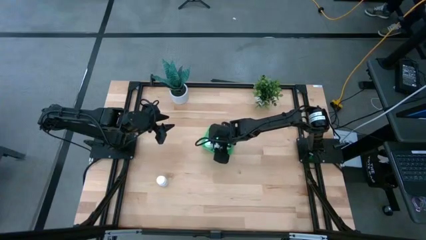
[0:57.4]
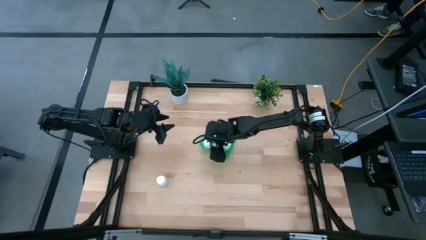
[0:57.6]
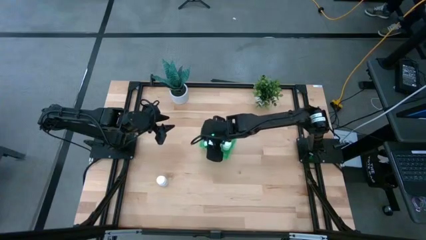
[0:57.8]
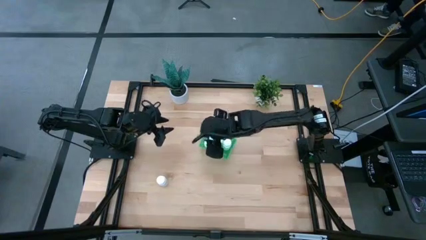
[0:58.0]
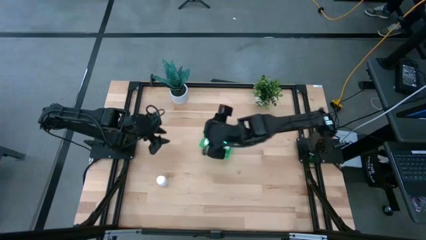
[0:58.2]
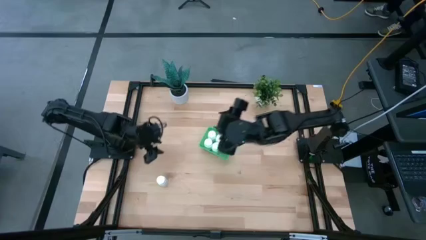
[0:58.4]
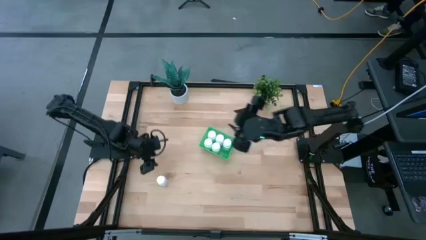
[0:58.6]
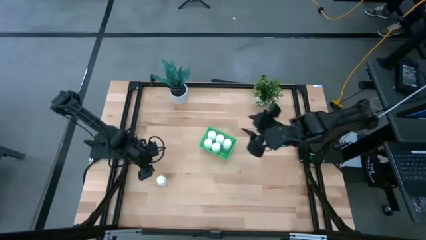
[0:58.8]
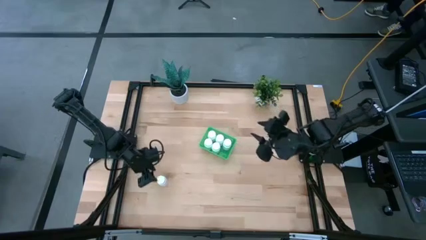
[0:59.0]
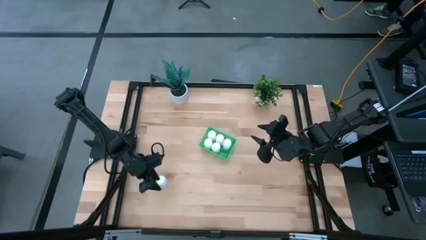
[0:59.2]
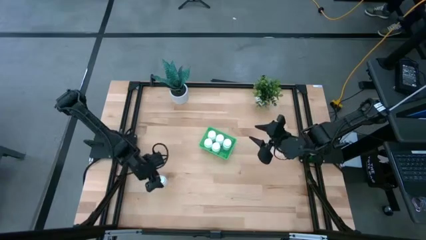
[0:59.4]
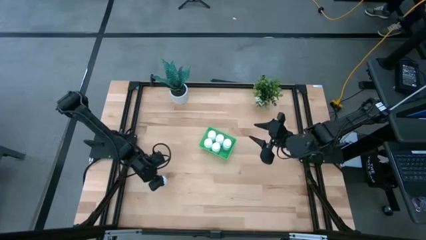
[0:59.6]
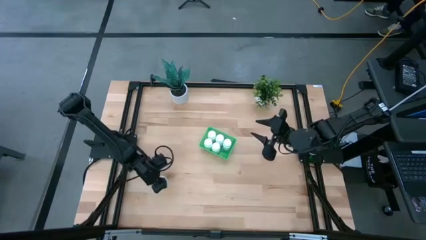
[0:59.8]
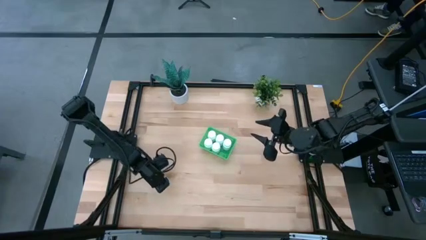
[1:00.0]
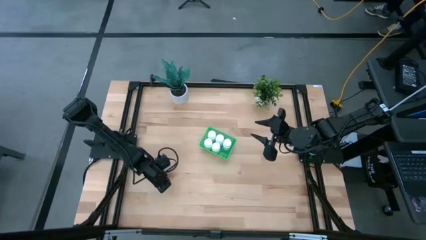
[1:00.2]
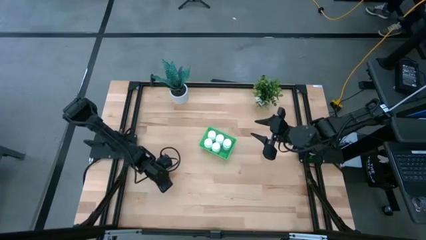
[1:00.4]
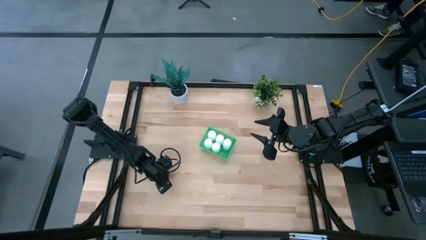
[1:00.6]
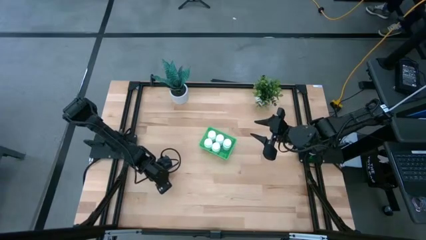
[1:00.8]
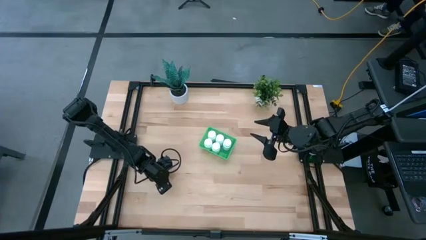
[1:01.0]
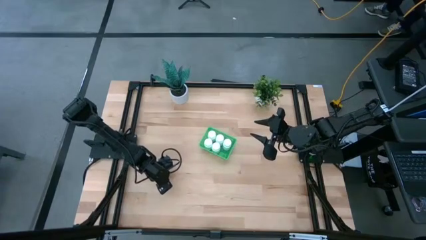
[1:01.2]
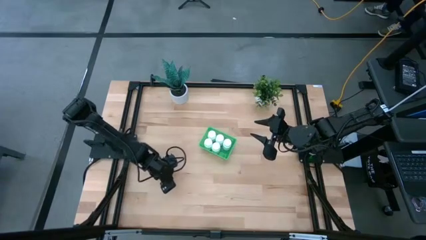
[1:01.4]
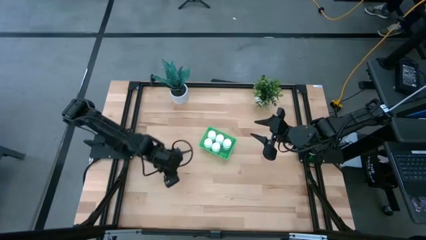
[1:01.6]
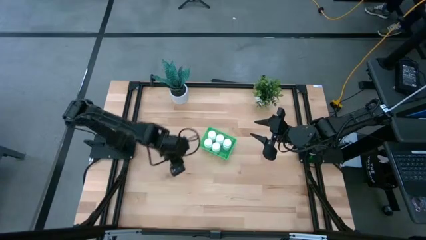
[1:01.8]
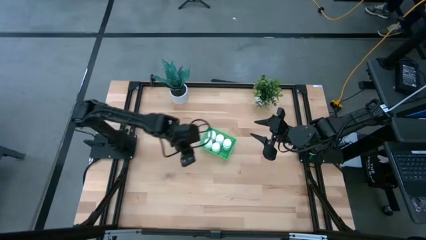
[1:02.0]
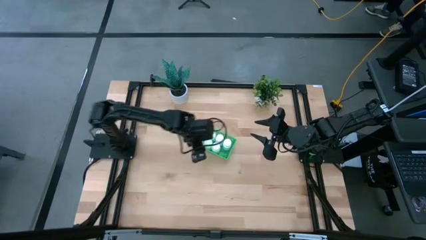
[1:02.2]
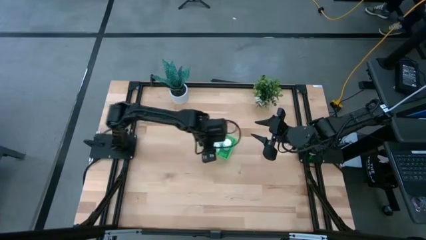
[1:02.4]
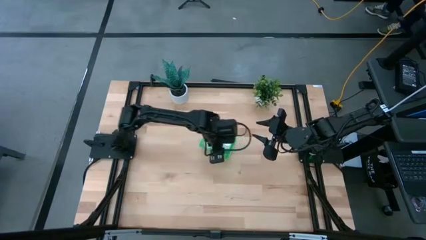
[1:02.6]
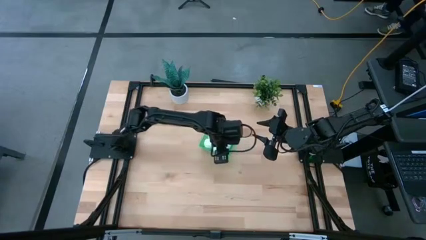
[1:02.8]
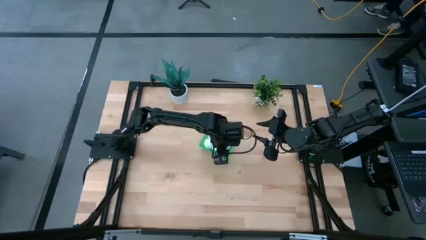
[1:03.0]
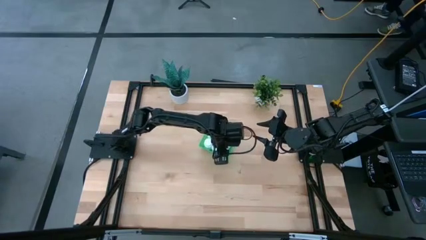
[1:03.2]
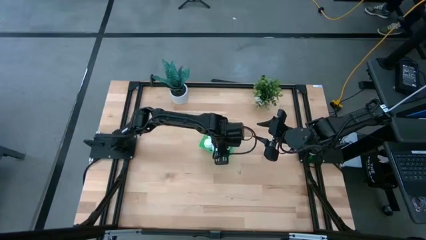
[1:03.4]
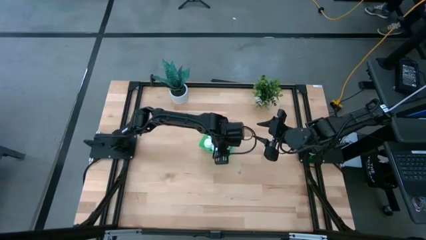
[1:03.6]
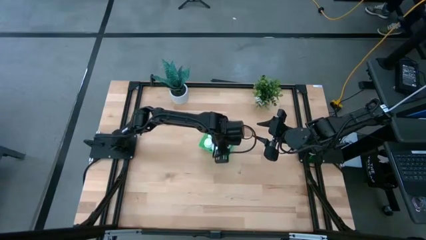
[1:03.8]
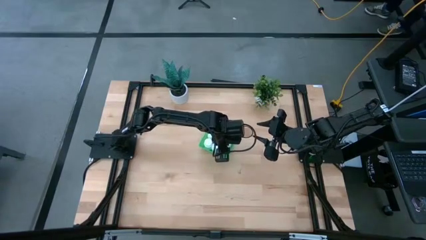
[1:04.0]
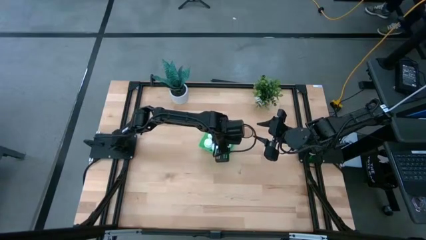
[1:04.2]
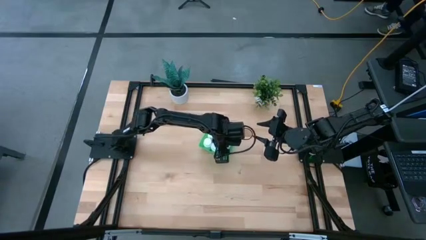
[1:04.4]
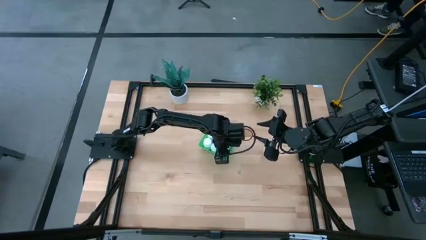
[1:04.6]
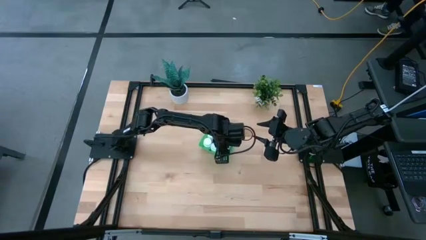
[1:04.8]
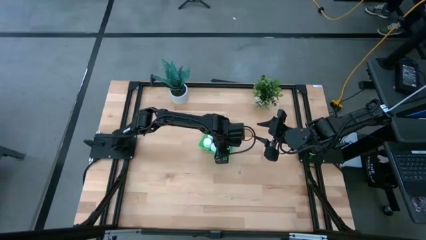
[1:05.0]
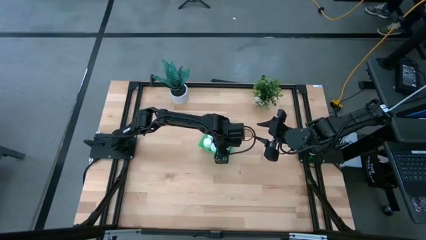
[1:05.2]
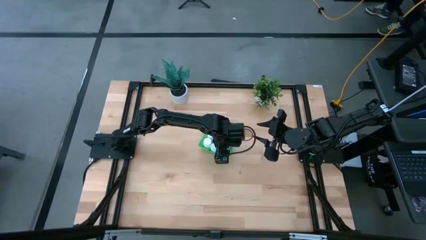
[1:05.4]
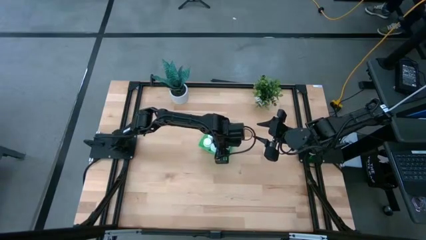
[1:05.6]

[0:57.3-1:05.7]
Task: Pick and place pill bottles into a basket
Put the medicine bottle into the green basket

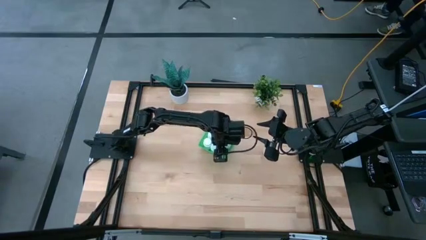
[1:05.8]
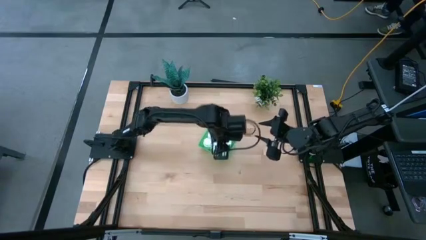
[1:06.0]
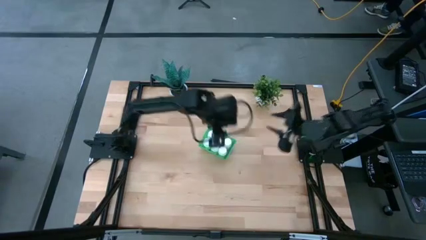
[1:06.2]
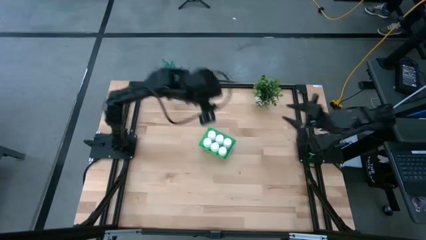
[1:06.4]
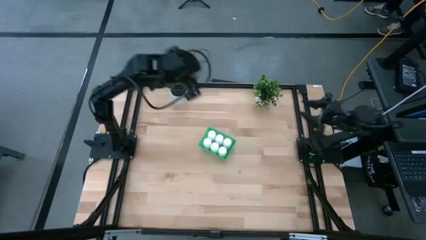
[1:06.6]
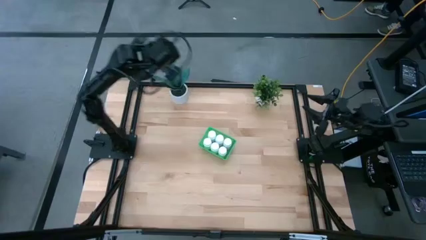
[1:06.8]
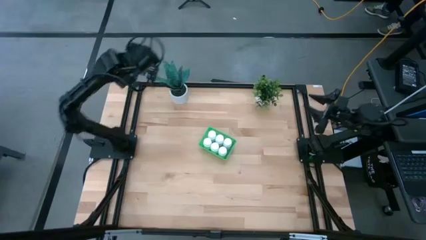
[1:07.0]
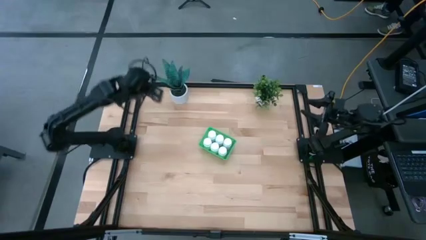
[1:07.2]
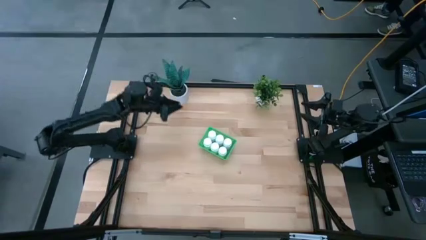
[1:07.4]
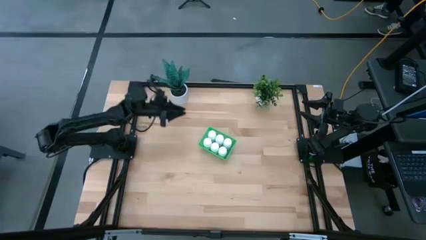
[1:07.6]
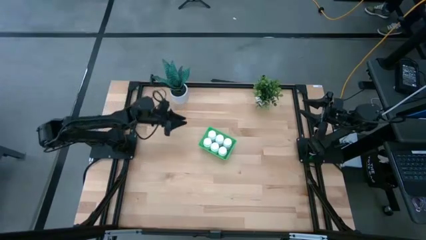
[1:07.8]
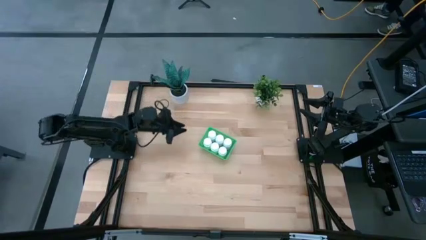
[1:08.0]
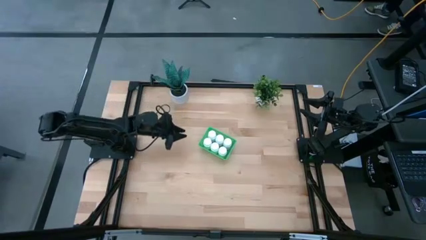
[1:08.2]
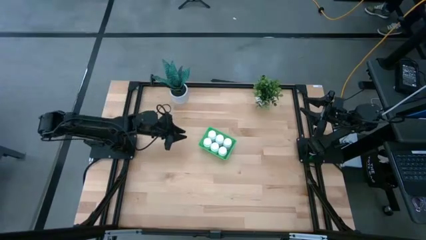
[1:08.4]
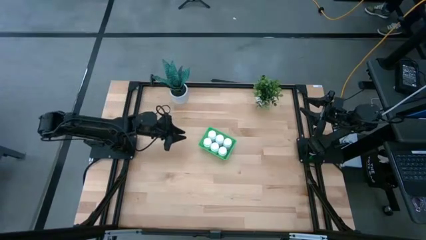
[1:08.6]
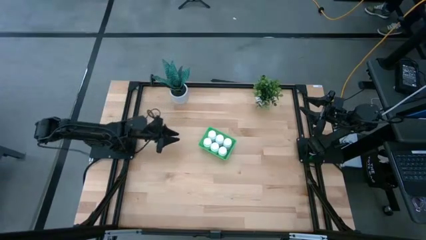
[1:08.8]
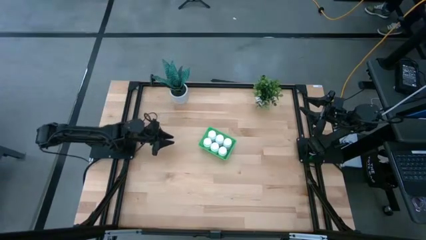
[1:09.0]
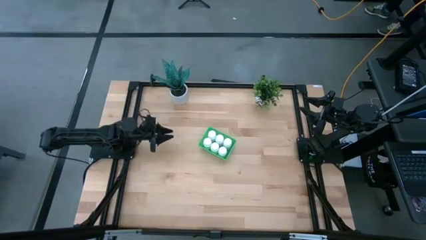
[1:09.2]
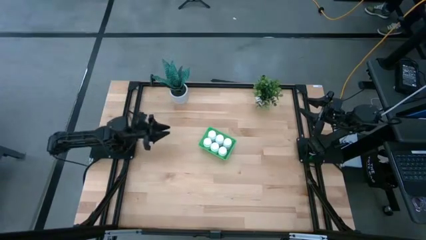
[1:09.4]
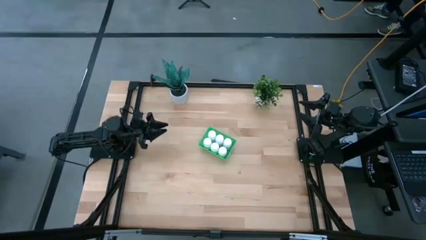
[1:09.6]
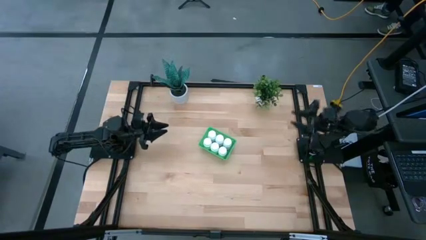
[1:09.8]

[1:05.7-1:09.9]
Return to Home Position

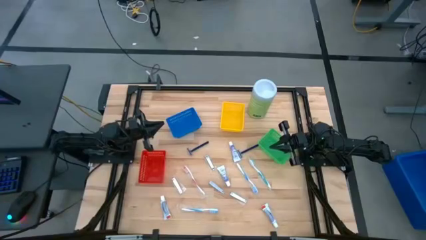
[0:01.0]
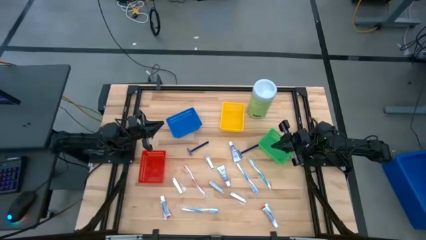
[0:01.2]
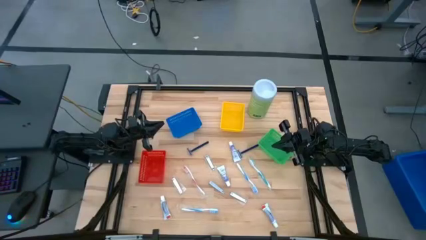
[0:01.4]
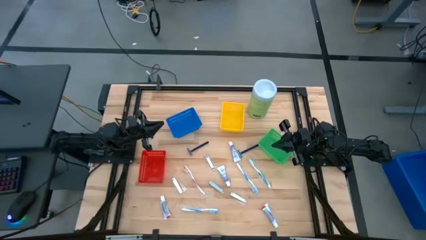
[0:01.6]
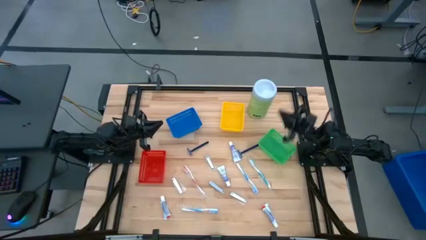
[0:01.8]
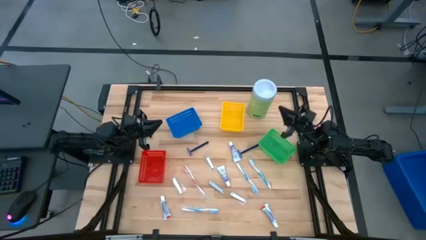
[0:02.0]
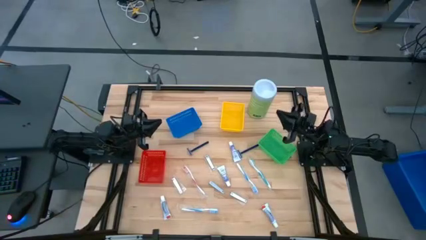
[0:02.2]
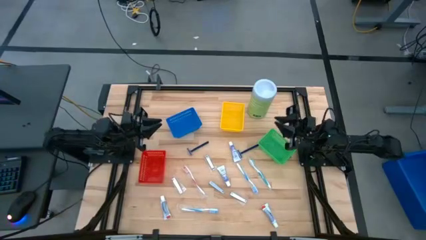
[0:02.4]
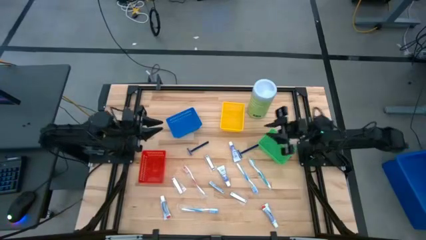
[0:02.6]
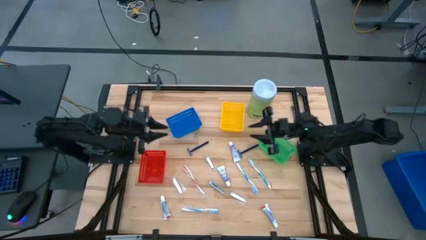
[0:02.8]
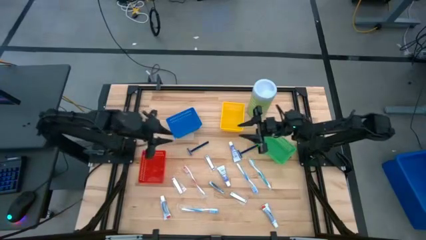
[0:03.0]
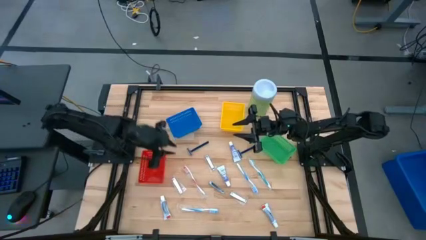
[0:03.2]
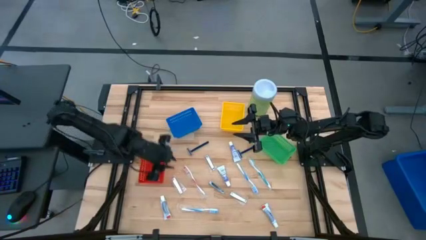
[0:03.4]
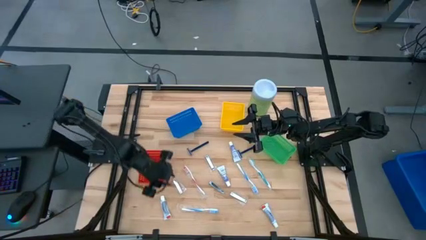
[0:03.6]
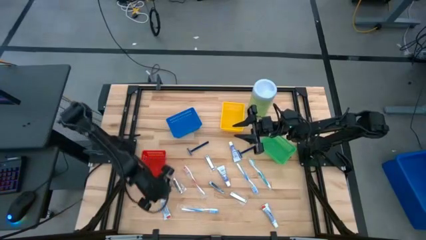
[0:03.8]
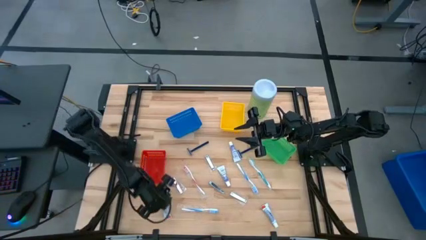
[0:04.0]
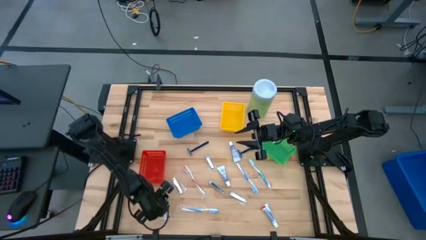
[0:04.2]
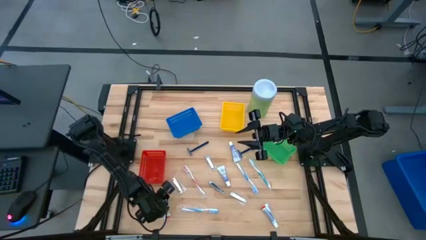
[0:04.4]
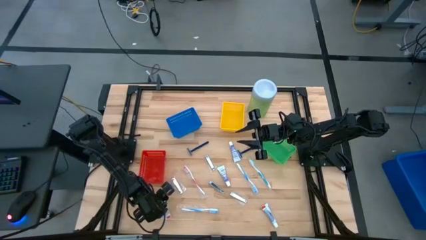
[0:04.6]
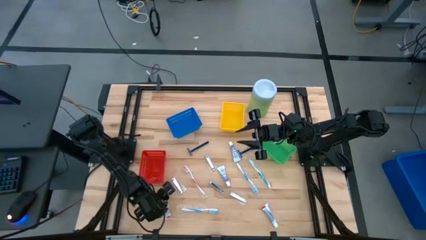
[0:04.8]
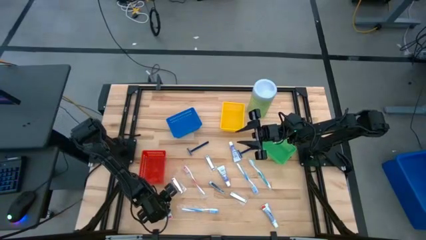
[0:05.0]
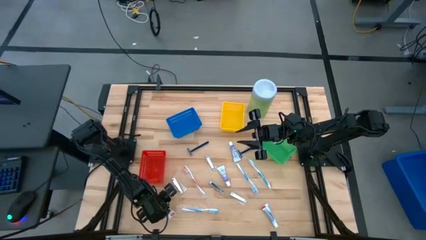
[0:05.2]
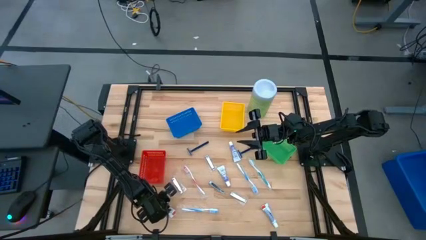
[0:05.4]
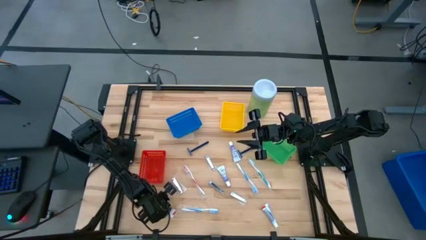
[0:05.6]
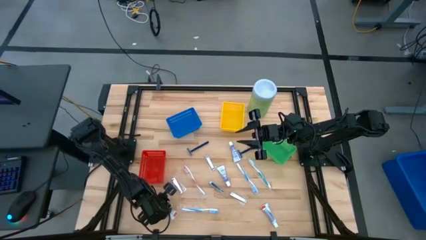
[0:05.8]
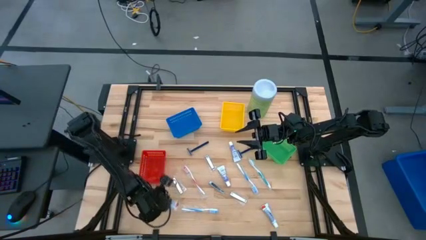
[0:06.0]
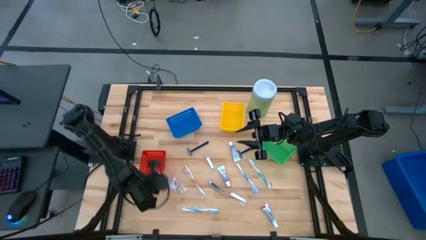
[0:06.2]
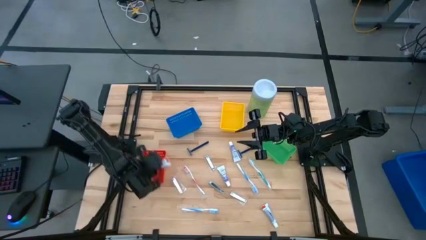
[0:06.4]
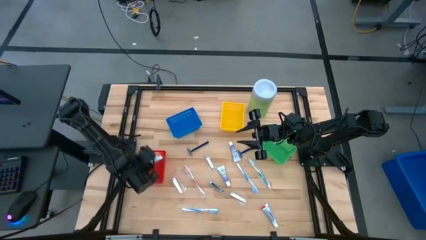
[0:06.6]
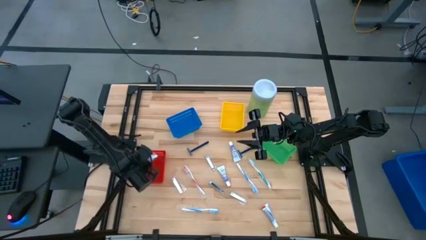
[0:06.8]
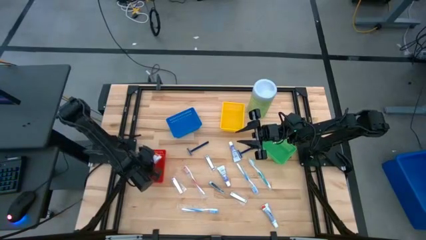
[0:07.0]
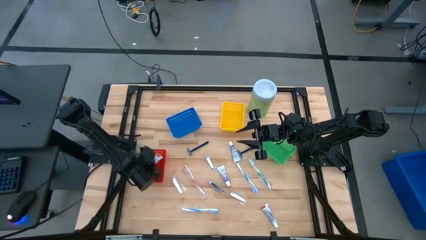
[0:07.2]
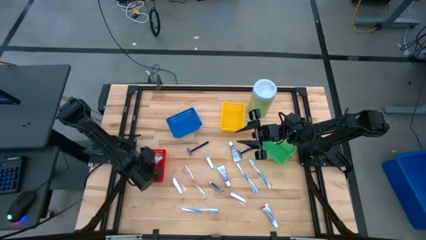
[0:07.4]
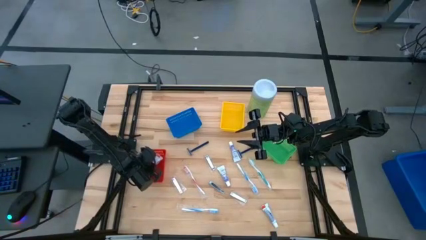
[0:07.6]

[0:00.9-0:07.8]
Task: Pick & Place Travel size toiletries
Put the white toothpaste into the red basket
